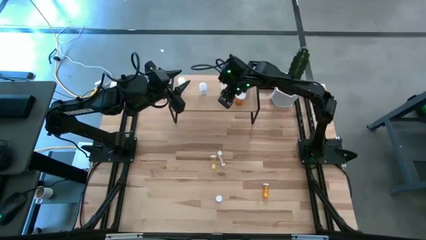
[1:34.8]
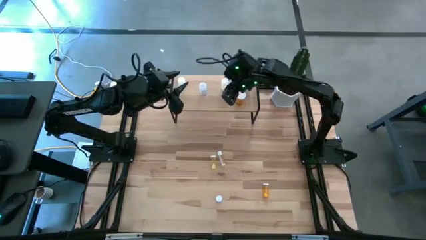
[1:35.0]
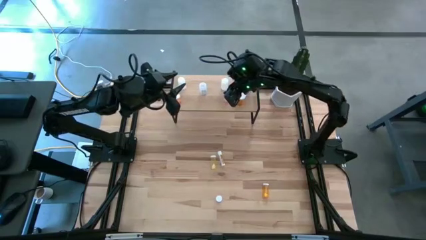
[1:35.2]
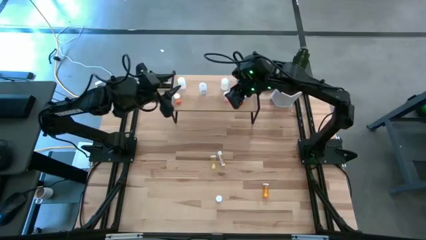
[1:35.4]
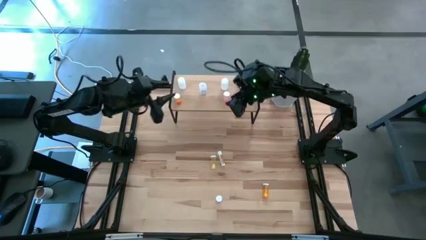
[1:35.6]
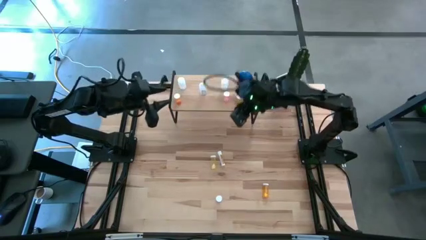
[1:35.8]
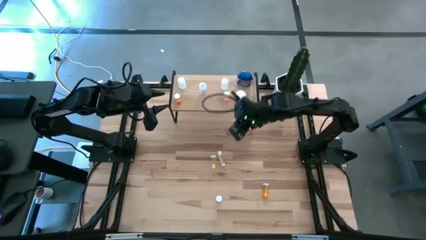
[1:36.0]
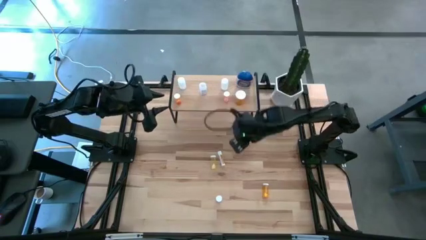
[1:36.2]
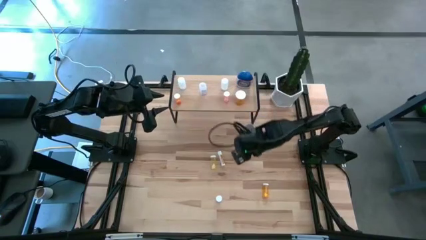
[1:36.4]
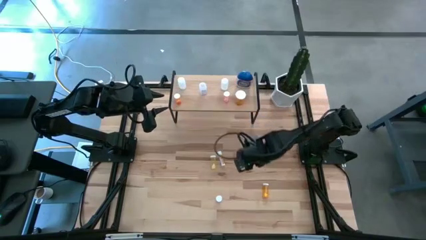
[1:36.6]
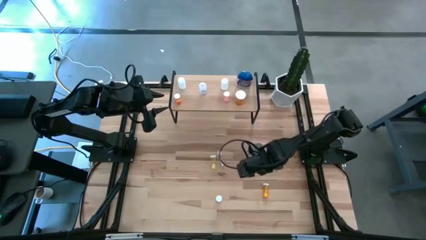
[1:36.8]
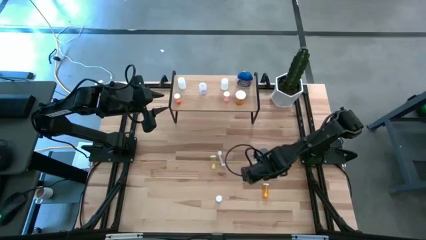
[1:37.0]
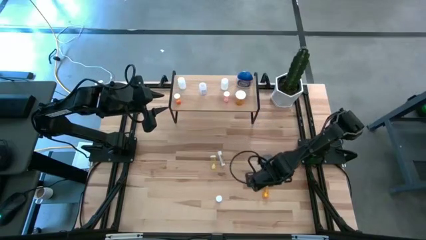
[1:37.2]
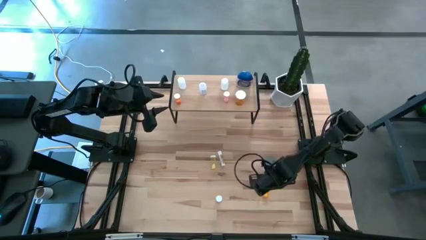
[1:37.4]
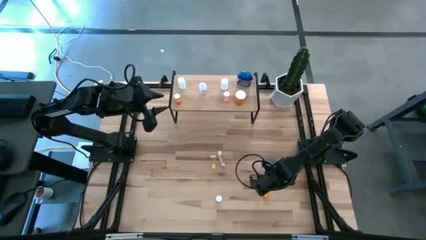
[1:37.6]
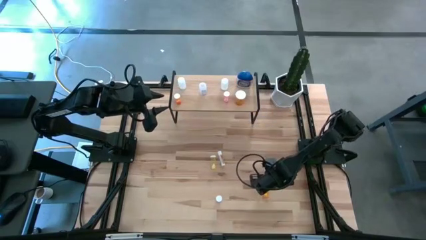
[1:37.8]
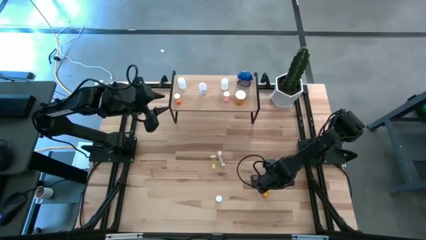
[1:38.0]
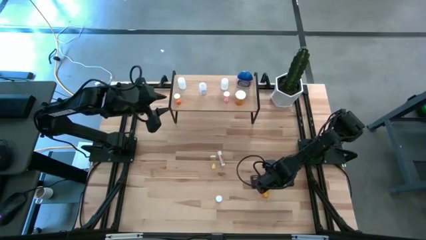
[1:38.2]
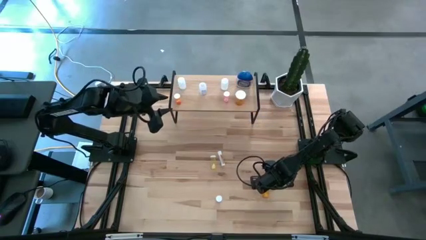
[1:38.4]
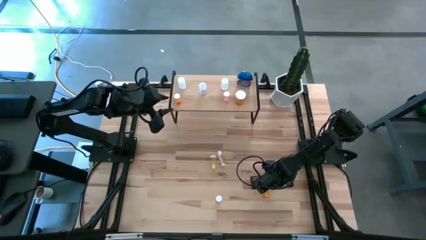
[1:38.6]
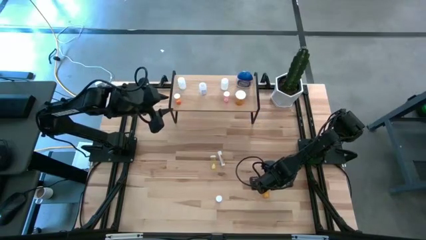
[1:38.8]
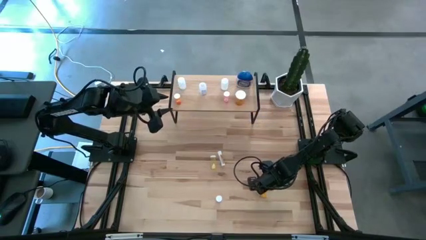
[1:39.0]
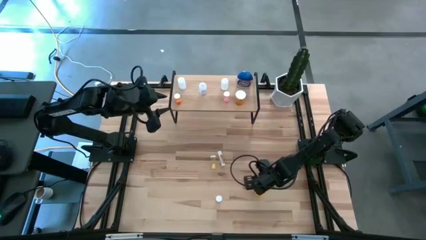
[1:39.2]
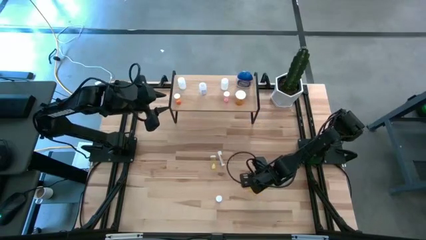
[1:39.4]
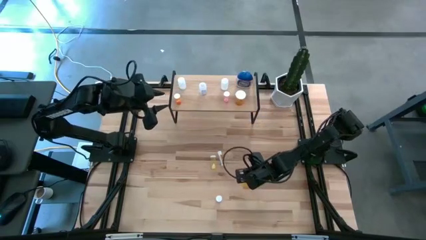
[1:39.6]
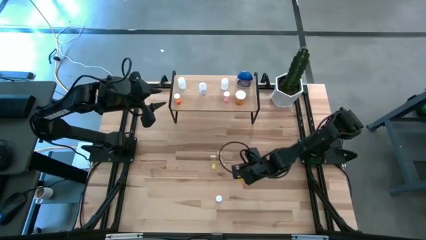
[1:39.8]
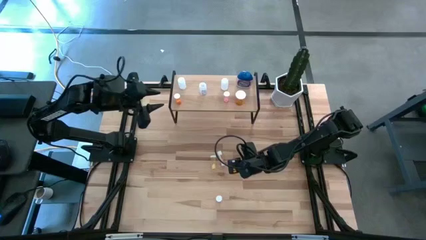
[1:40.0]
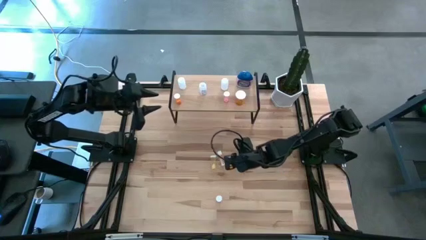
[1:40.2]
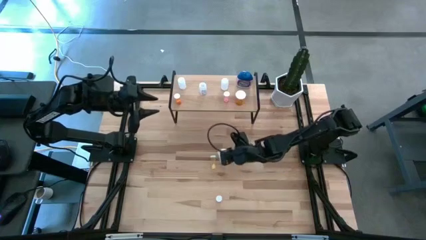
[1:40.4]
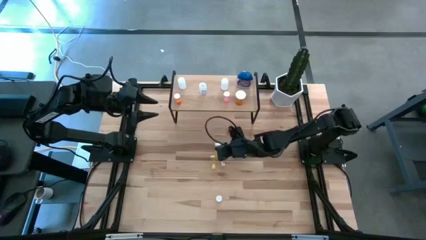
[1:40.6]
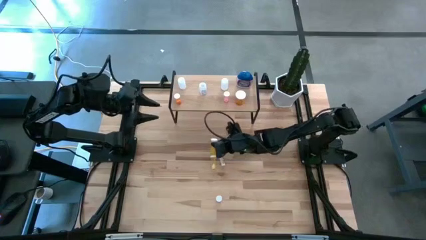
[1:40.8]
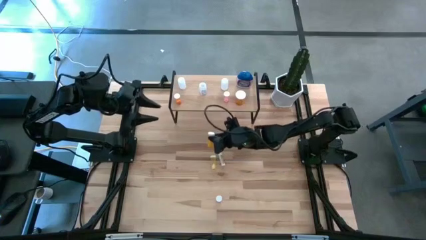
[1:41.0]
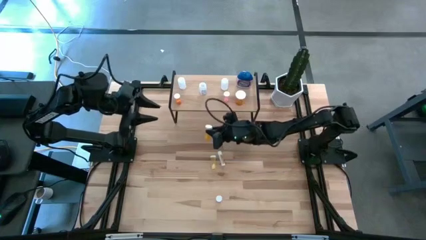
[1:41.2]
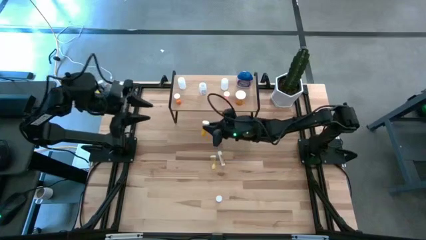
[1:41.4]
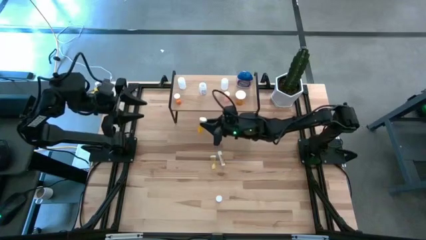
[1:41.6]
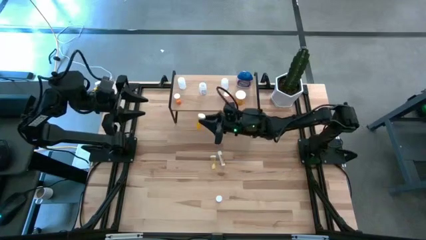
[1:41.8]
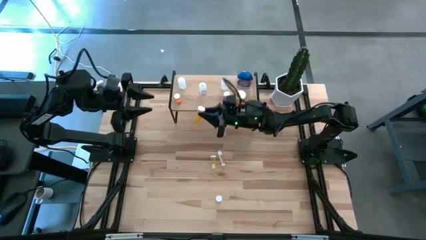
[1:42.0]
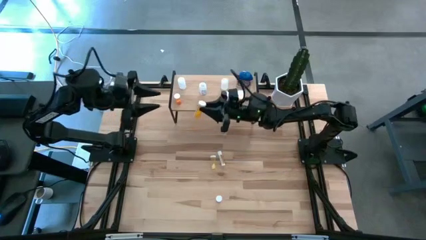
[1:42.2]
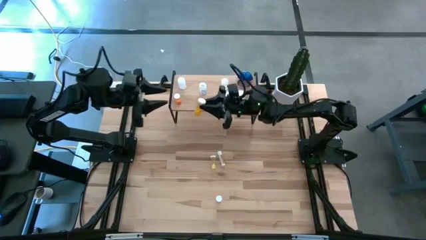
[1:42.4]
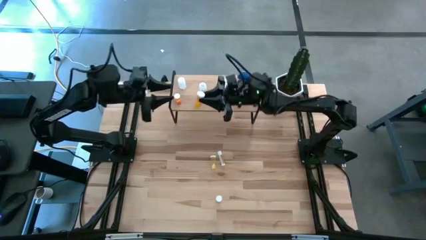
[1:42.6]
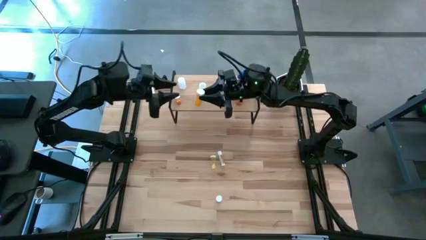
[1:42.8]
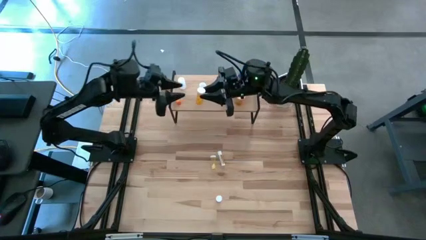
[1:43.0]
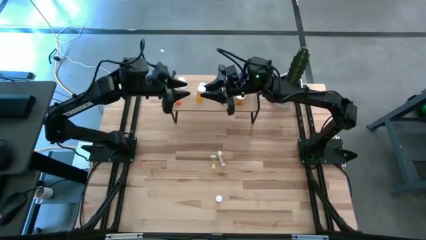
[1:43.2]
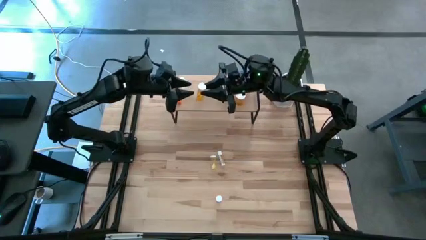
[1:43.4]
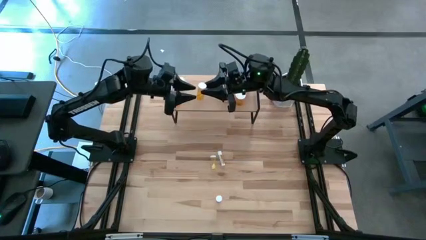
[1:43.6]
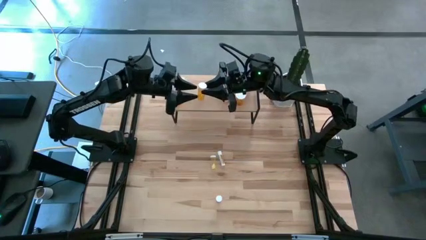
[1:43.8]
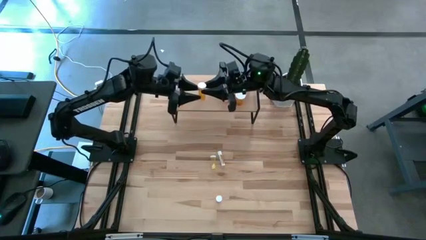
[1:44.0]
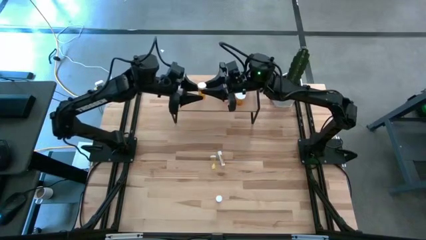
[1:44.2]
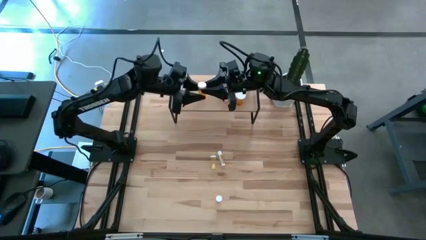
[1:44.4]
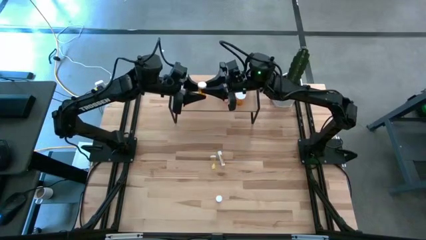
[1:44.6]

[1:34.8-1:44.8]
Task: Pick and place medicine bottles onto shelf by color
Put the orange pill bottle on the shelf

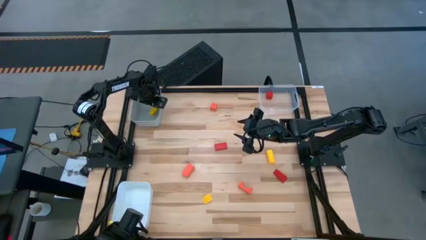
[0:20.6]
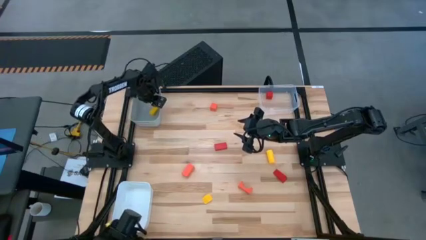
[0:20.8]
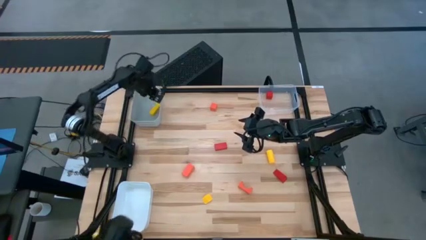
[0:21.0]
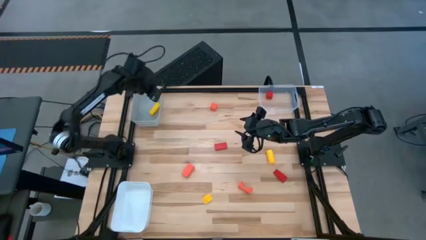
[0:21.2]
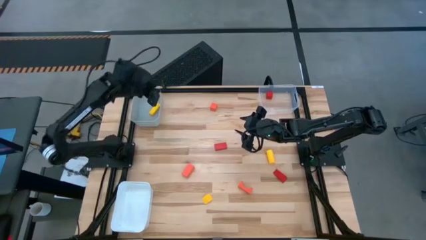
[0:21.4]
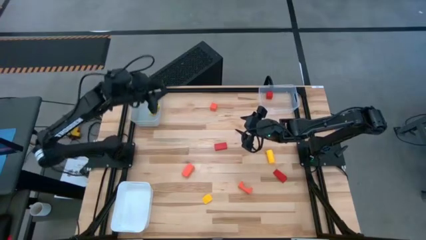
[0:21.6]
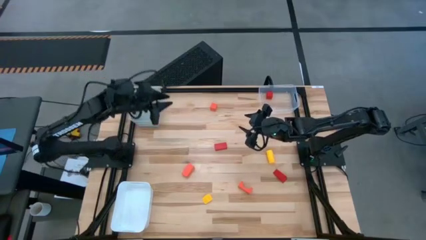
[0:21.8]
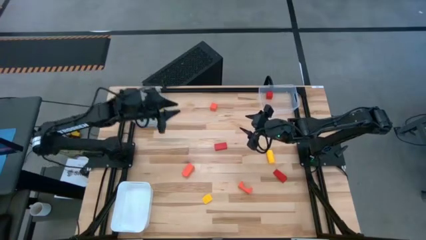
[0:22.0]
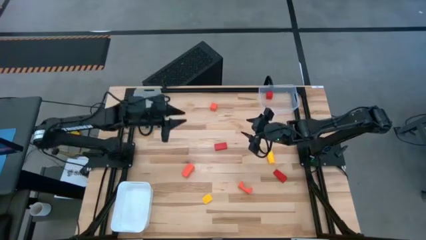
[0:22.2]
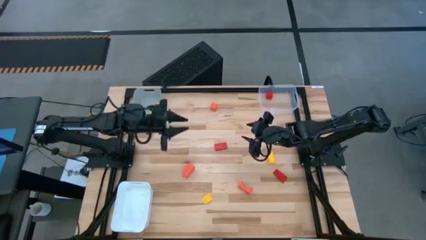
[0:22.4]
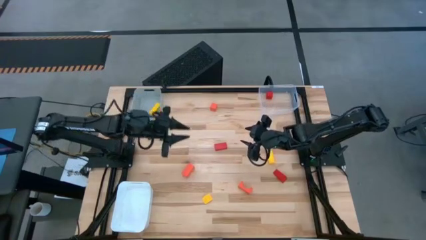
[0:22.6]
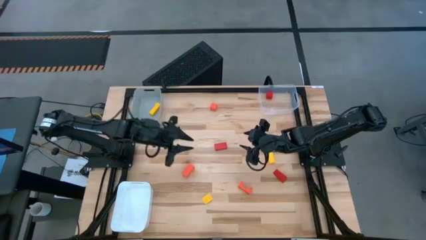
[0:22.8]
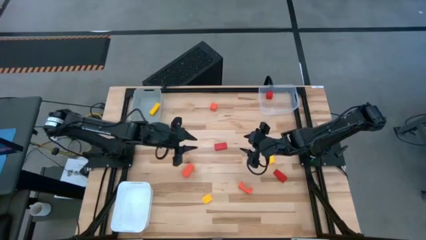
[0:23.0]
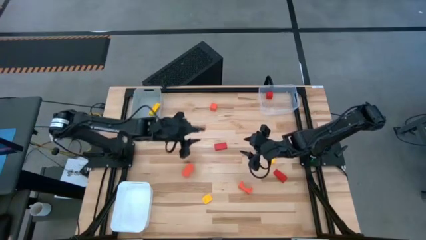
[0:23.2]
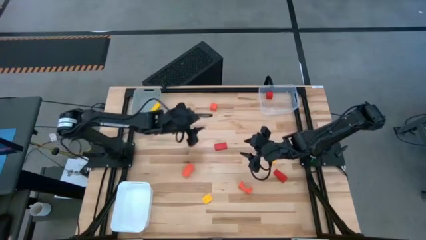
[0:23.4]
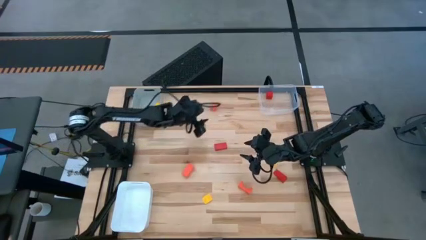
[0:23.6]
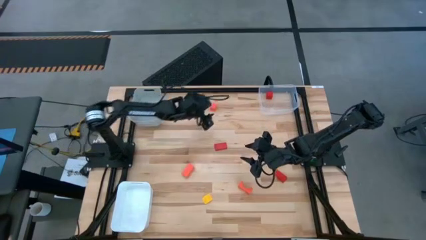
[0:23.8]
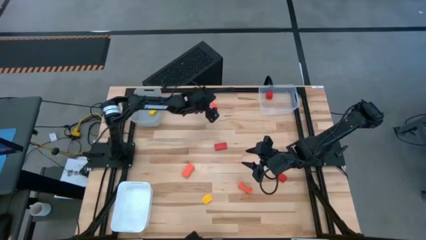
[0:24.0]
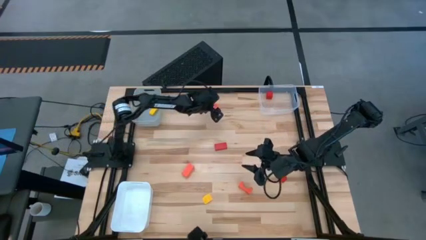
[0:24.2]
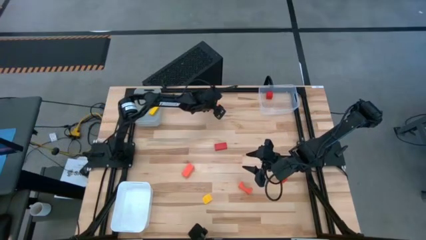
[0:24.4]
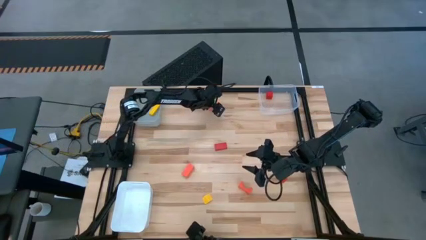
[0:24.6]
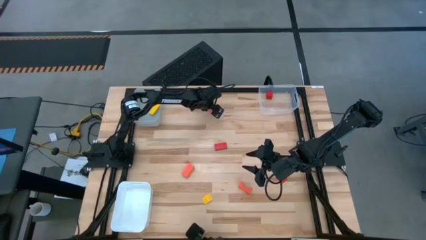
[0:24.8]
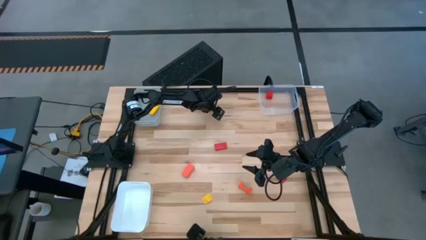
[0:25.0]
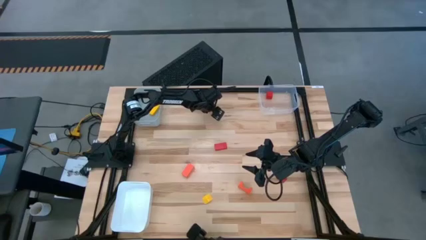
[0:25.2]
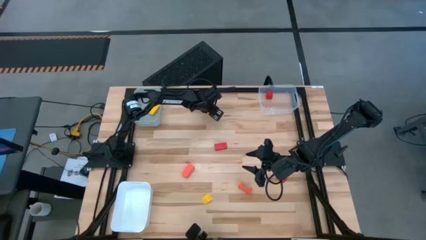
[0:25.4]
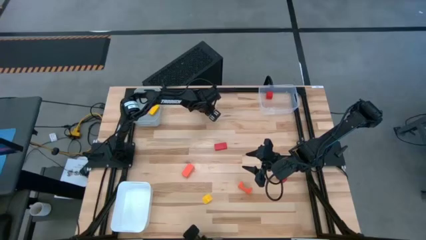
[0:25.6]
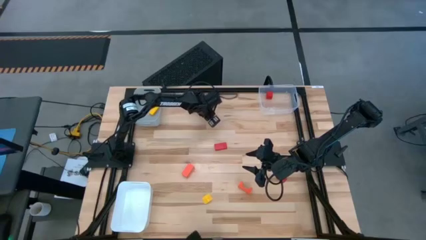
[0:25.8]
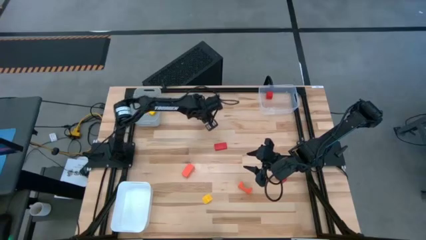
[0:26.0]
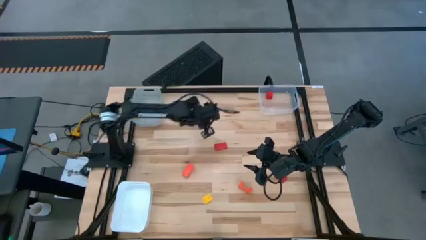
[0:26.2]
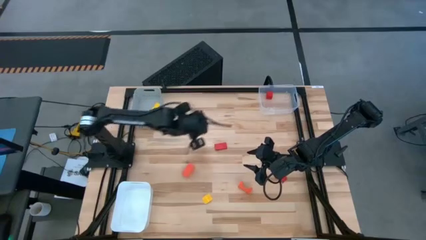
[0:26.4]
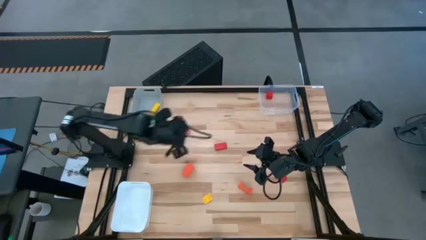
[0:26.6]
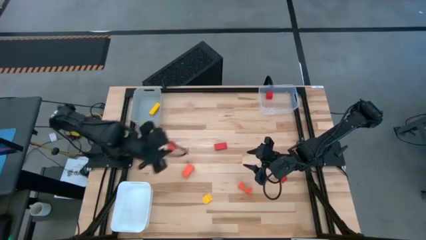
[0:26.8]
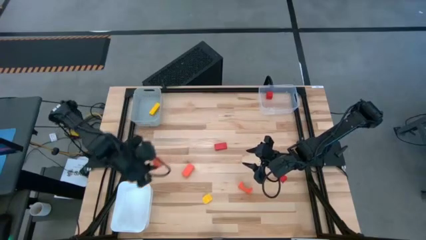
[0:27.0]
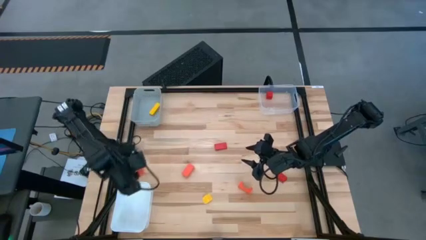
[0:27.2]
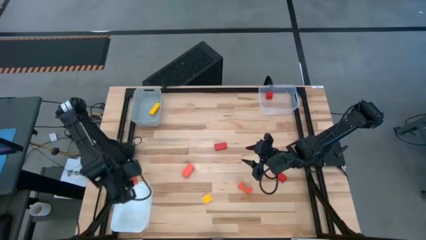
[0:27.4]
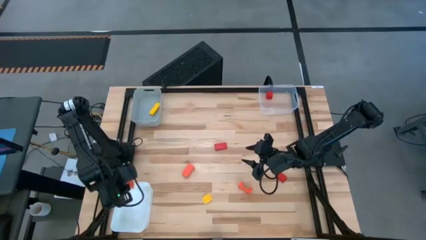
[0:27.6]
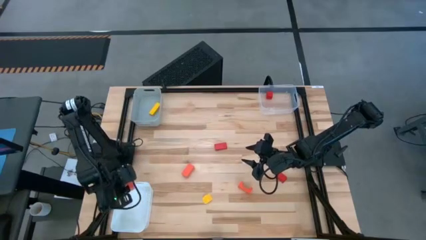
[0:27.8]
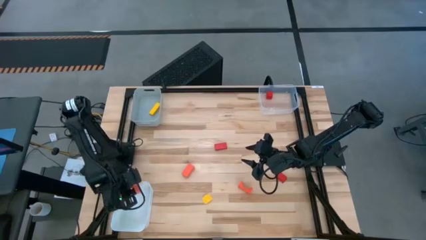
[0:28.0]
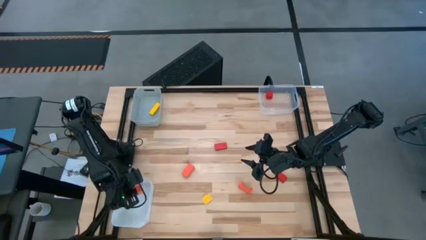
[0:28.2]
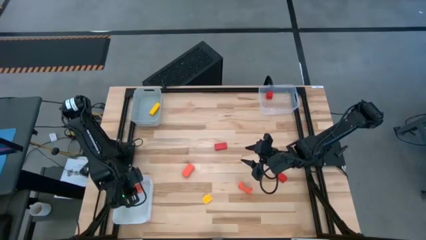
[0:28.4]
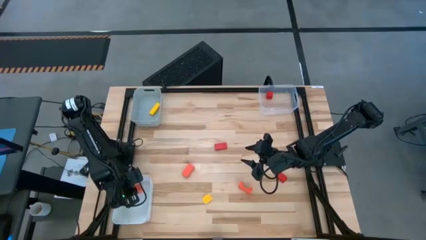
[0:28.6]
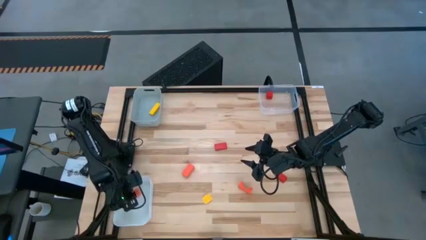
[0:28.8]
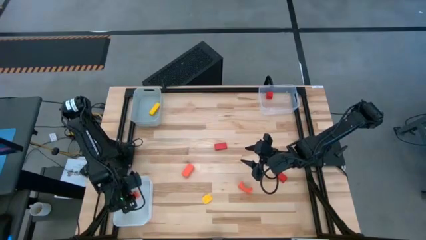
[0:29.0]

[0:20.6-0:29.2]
Task: Sort & place blocks by color
Put the top orange block into the white bin
